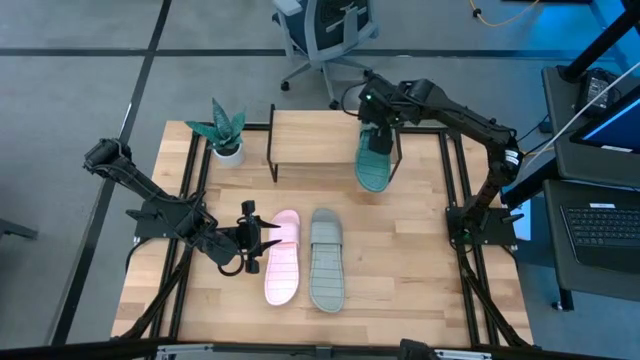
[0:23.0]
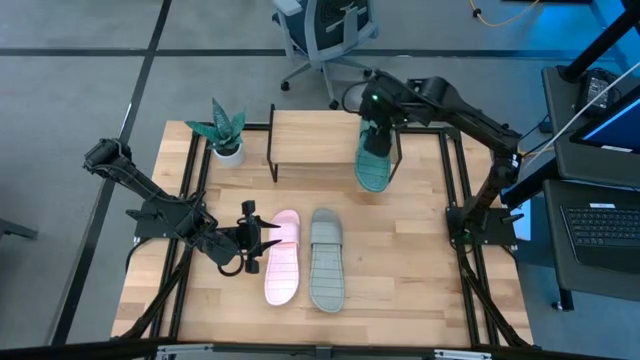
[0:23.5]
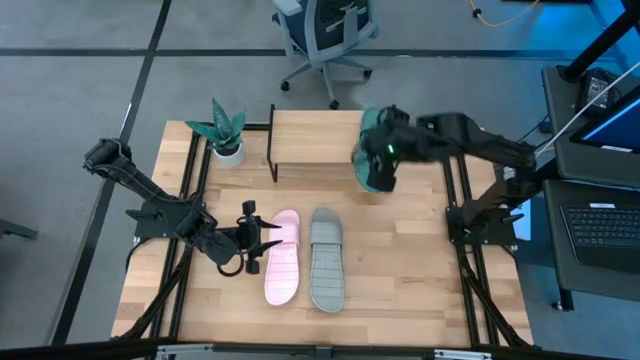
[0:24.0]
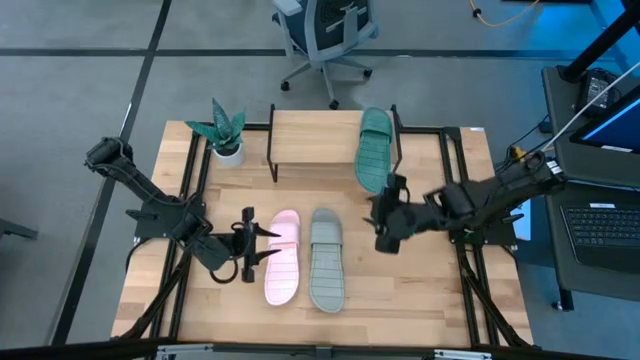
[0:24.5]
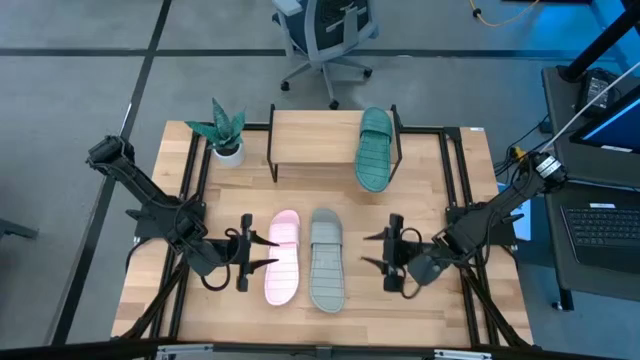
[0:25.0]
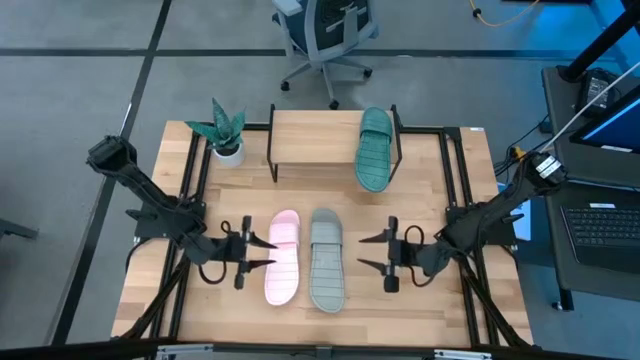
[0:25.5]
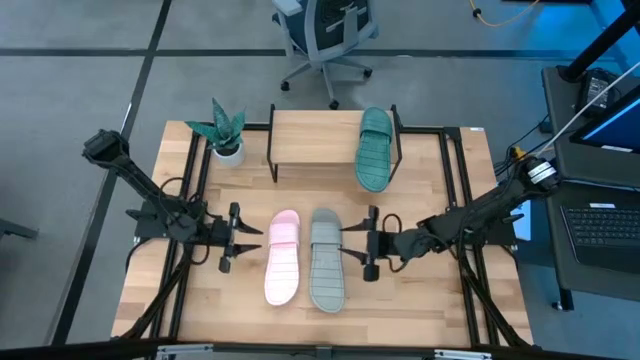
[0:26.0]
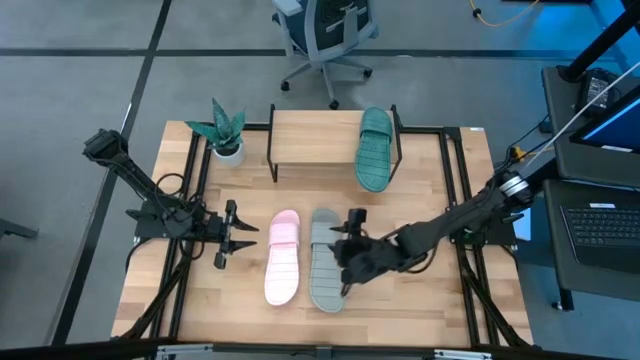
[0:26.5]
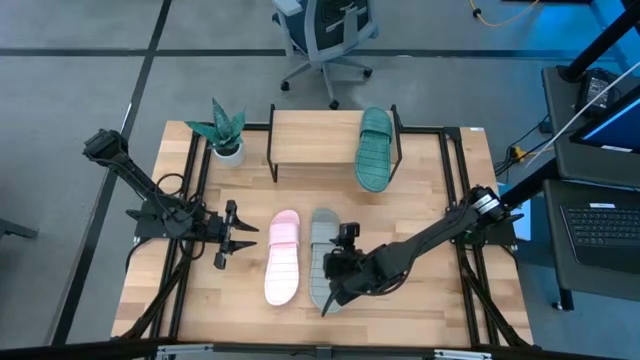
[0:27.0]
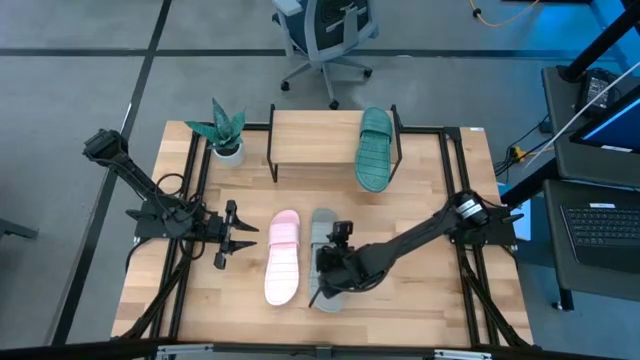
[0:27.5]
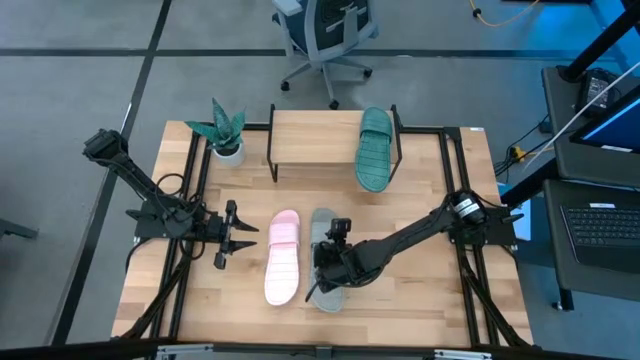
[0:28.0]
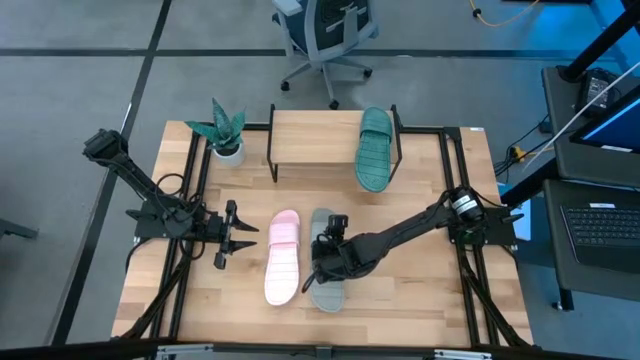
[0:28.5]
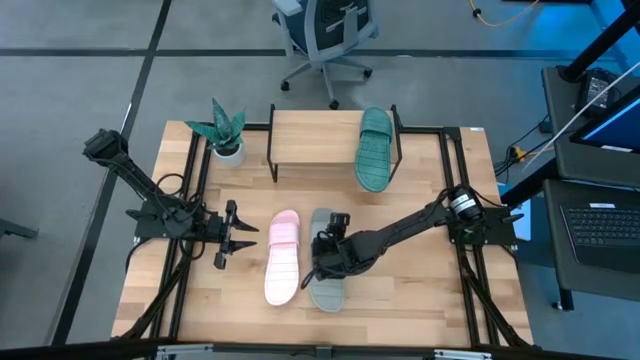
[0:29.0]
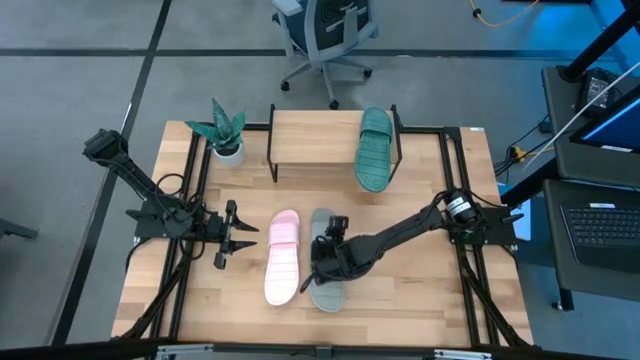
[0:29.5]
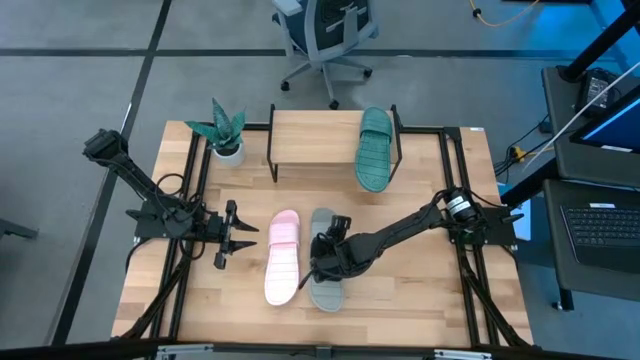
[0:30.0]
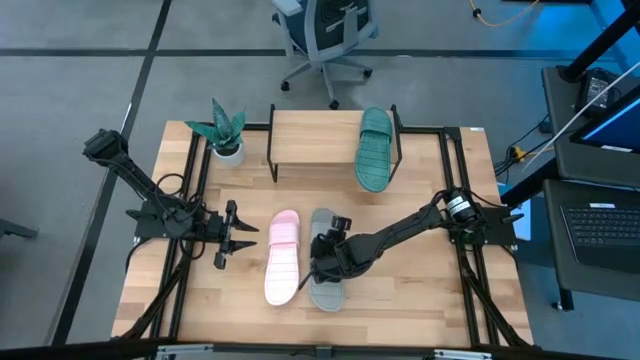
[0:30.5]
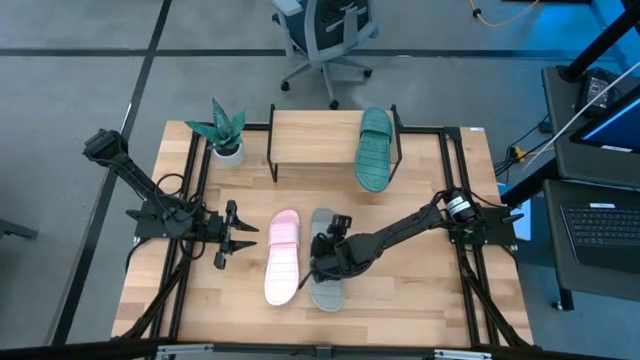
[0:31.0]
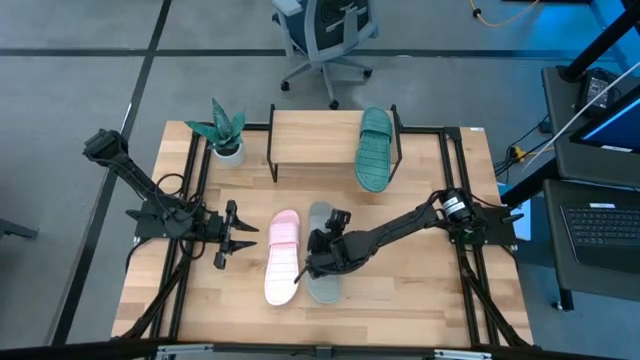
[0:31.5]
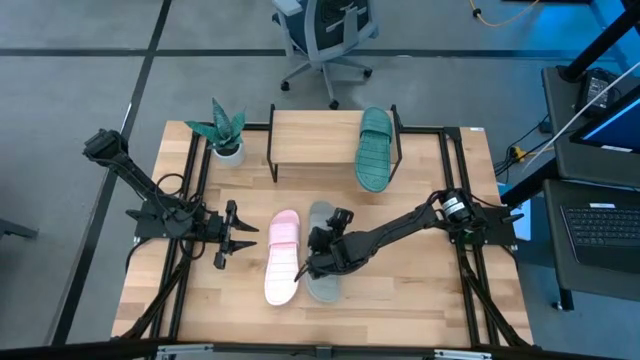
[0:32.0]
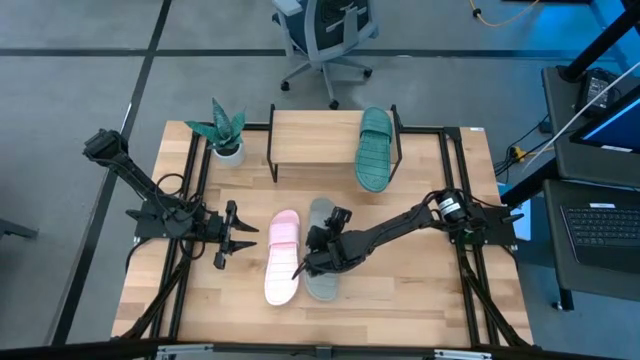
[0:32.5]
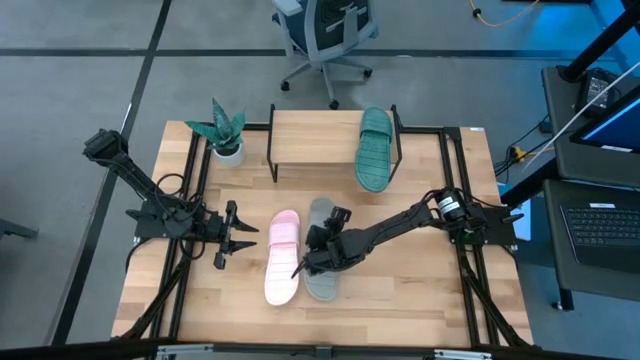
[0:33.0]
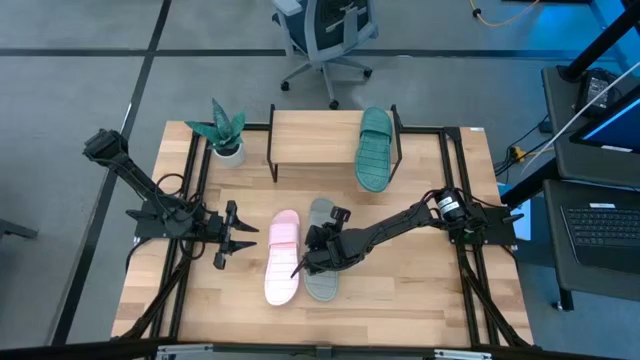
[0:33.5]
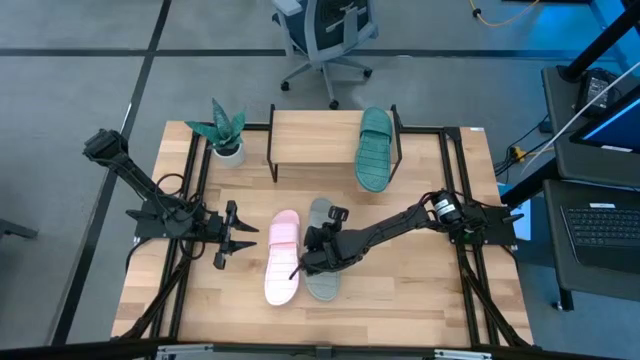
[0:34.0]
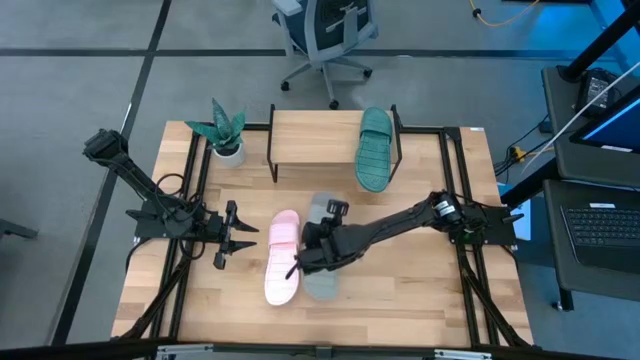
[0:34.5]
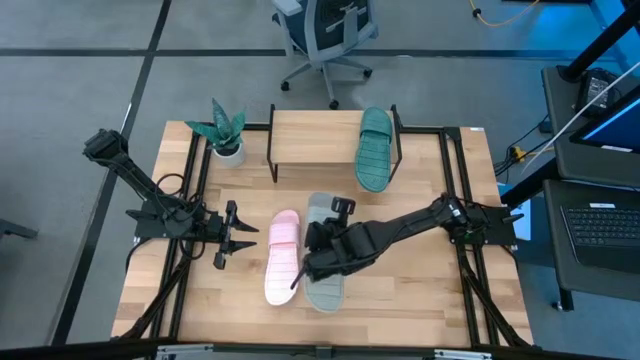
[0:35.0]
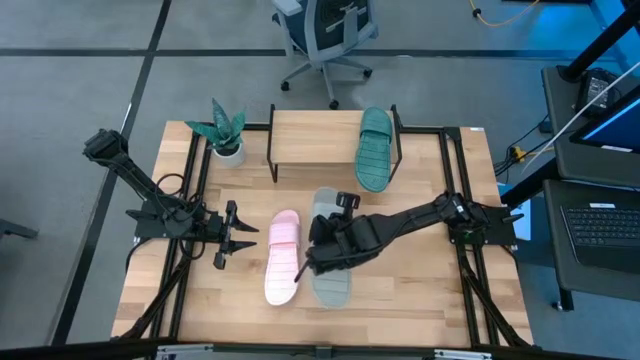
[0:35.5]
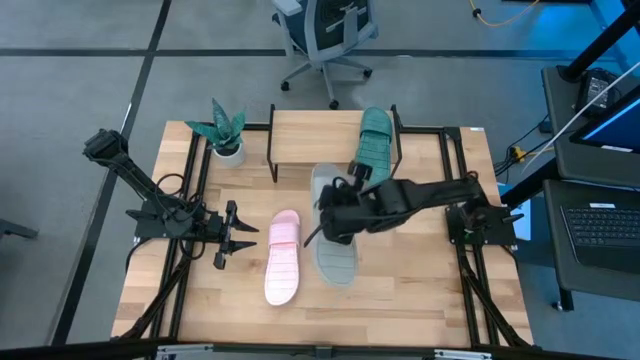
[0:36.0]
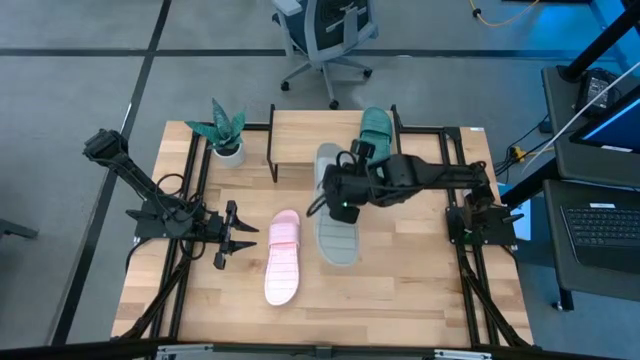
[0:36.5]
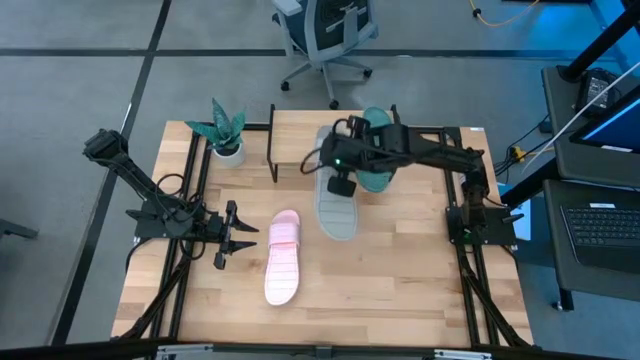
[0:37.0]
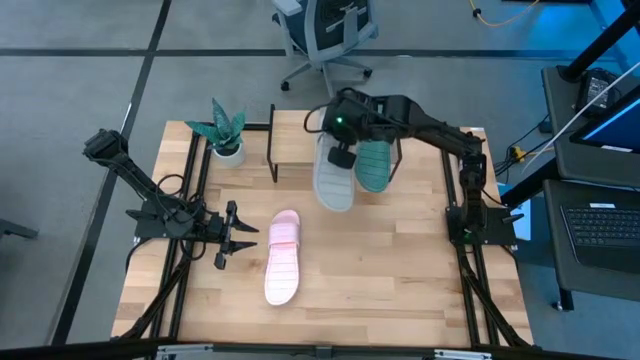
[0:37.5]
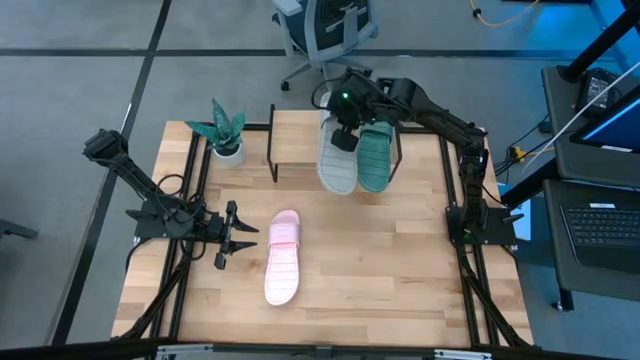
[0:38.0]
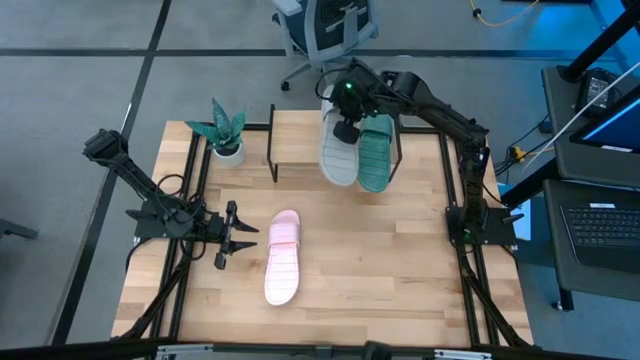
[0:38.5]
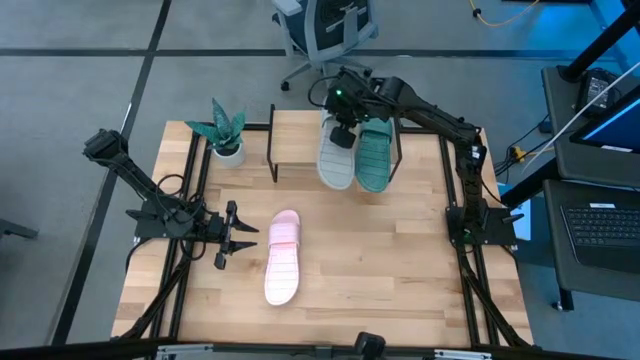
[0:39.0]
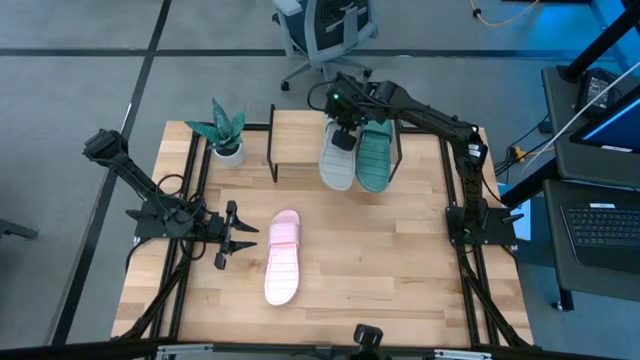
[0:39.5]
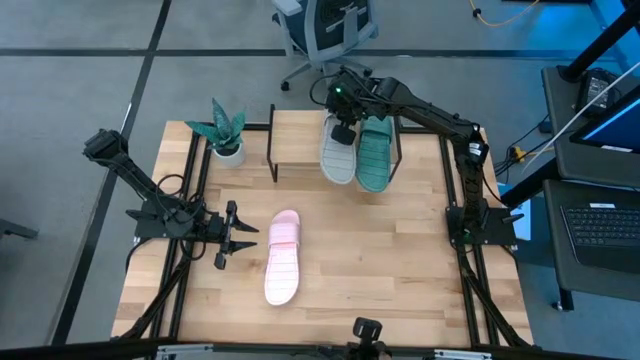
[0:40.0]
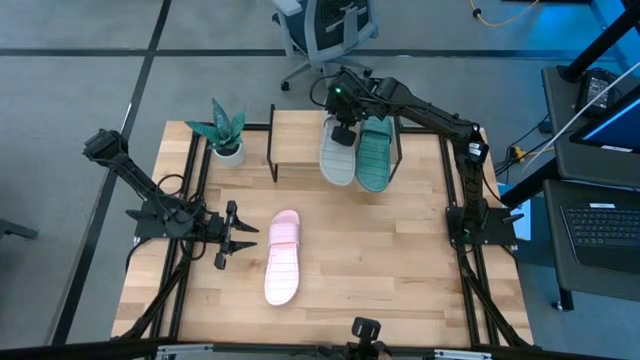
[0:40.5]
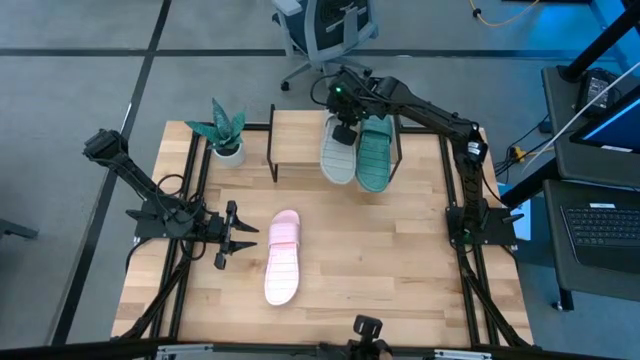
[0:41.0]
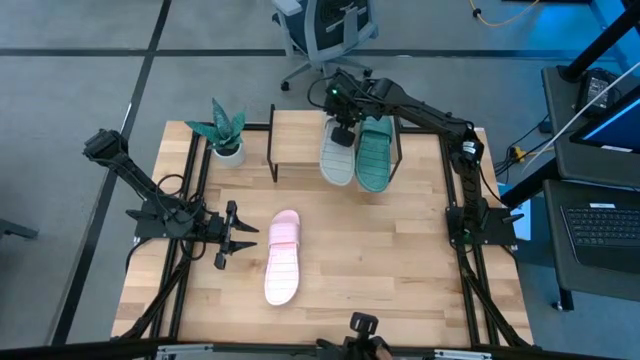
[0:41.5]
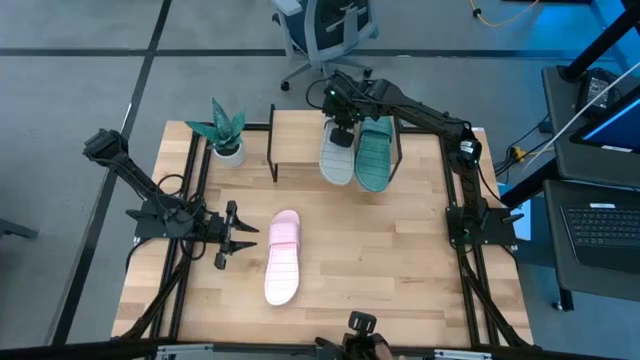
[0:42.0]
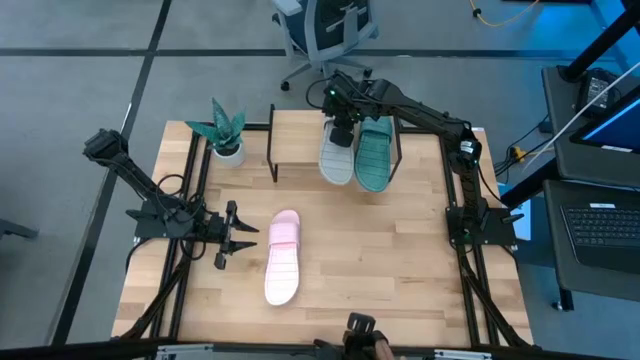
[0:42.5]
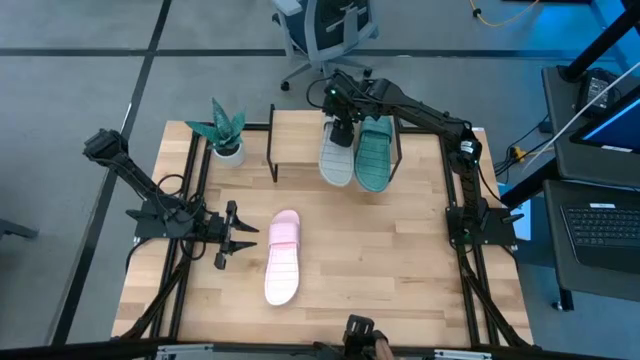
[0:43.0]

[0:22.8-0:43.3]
Task: Pick and place slides into the shelf
Put the pair of gray slides on the shelf
